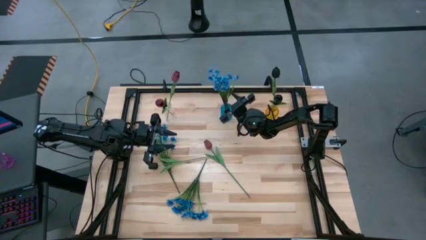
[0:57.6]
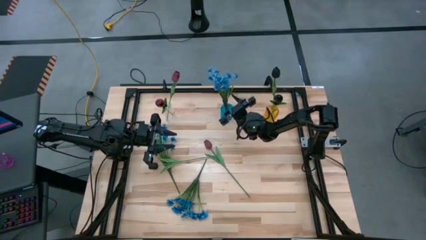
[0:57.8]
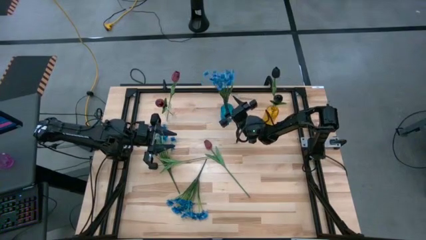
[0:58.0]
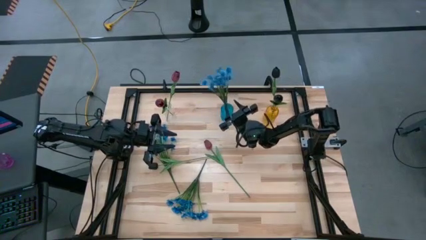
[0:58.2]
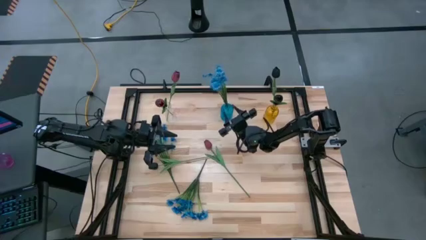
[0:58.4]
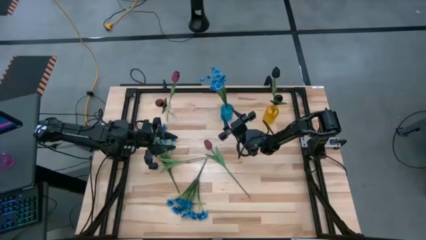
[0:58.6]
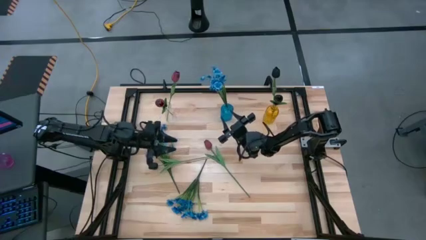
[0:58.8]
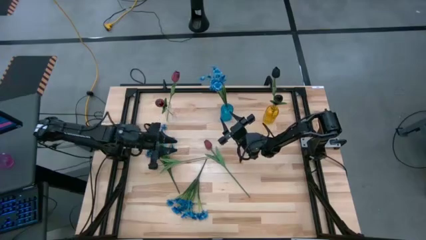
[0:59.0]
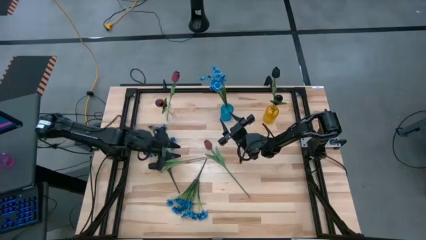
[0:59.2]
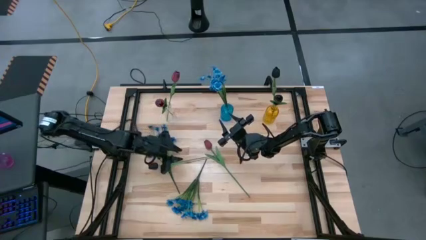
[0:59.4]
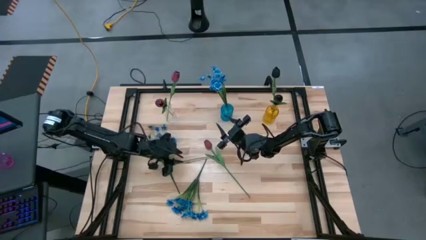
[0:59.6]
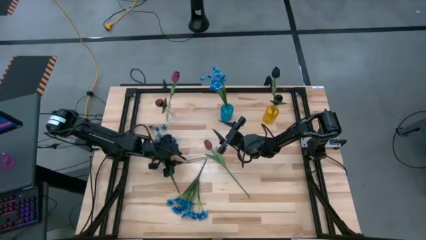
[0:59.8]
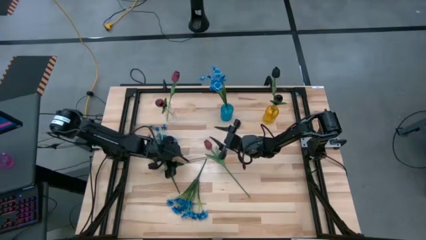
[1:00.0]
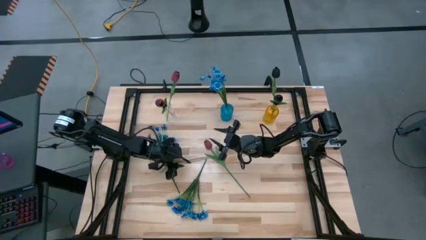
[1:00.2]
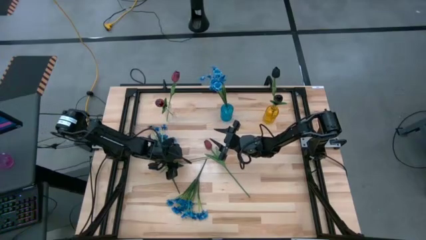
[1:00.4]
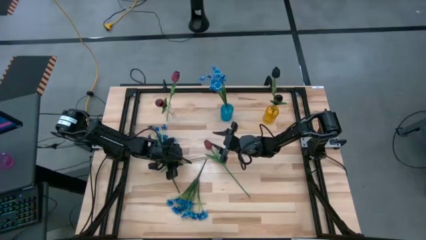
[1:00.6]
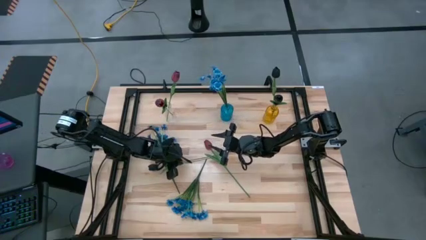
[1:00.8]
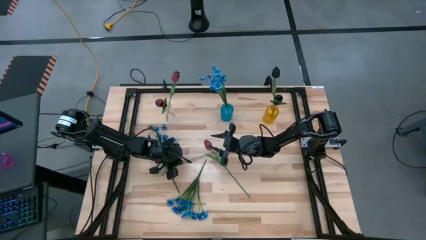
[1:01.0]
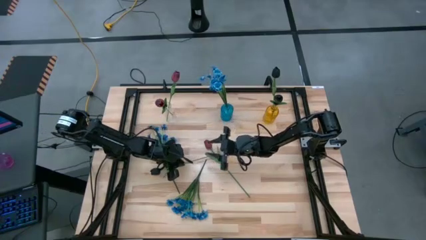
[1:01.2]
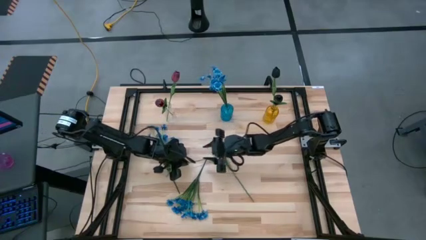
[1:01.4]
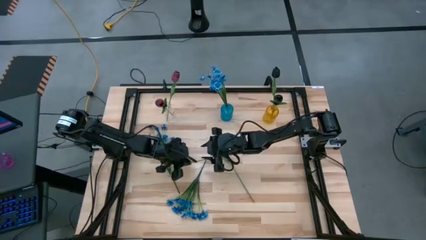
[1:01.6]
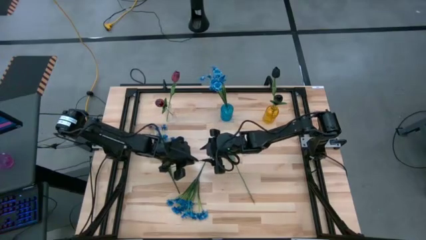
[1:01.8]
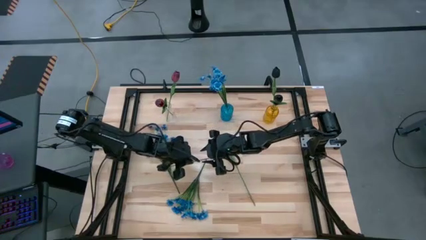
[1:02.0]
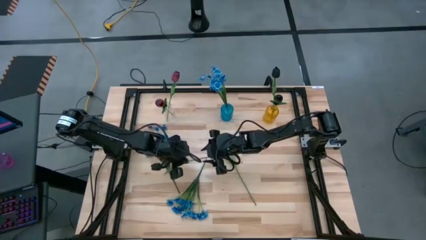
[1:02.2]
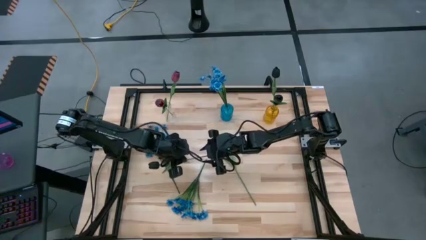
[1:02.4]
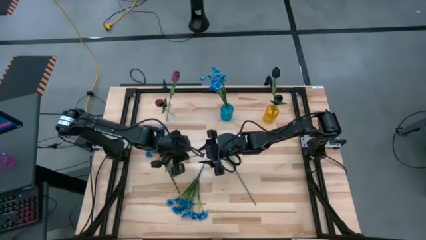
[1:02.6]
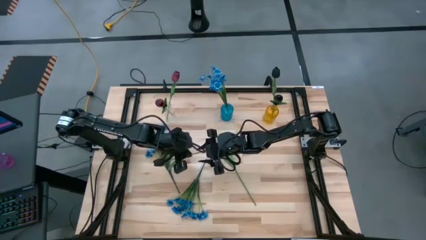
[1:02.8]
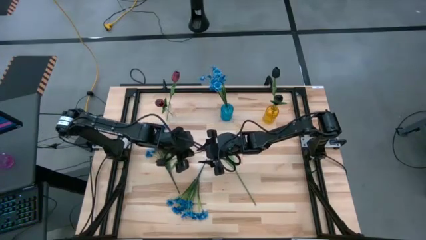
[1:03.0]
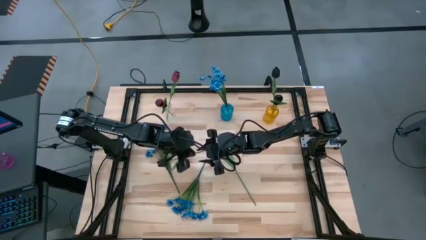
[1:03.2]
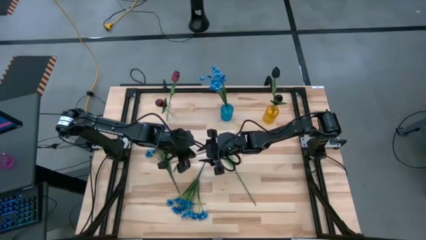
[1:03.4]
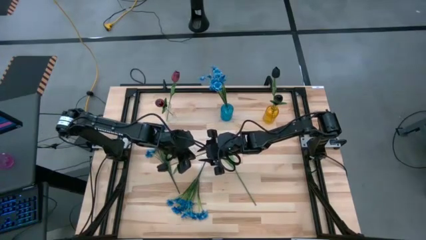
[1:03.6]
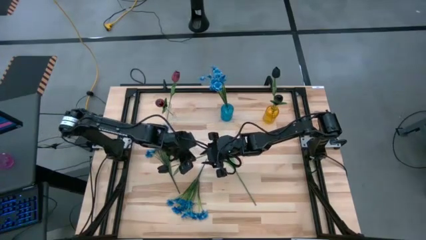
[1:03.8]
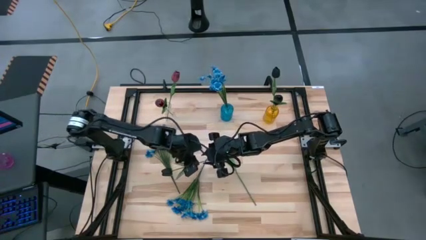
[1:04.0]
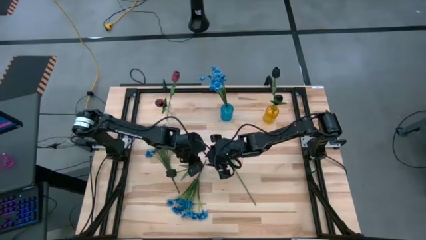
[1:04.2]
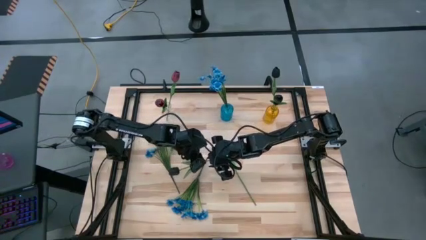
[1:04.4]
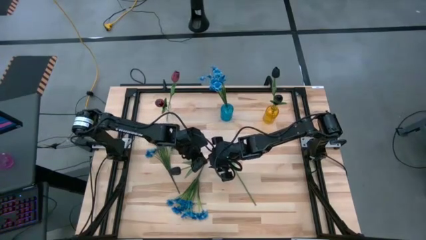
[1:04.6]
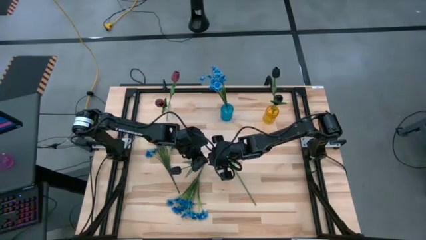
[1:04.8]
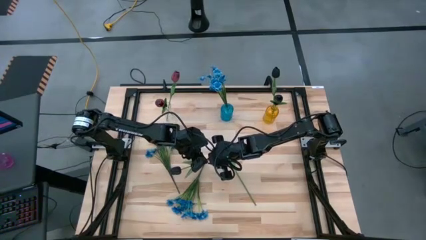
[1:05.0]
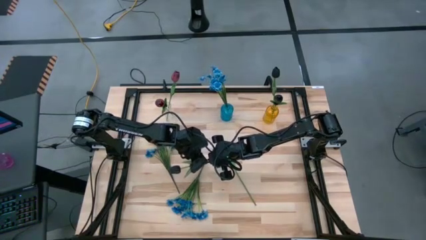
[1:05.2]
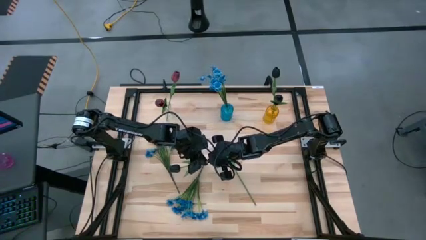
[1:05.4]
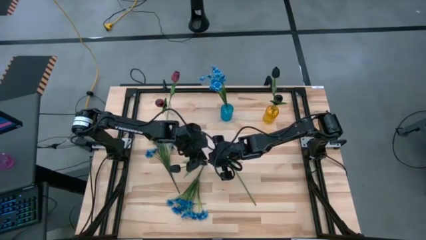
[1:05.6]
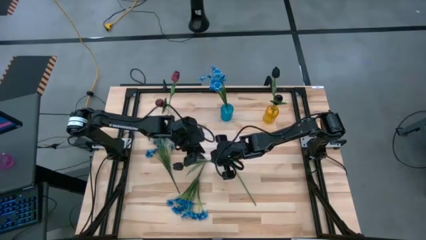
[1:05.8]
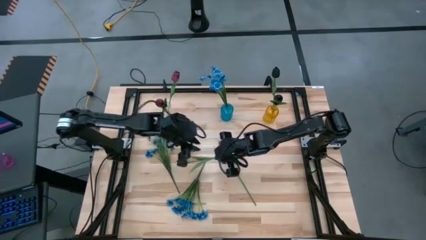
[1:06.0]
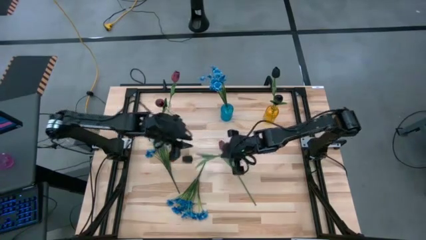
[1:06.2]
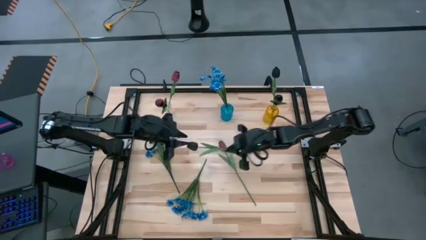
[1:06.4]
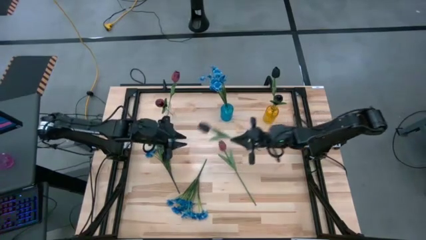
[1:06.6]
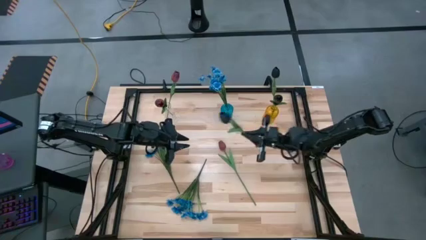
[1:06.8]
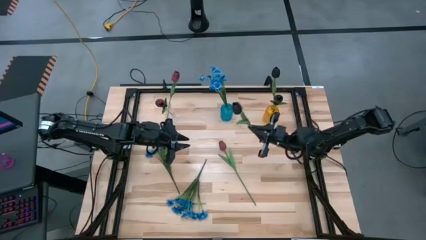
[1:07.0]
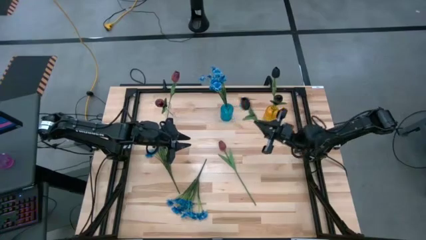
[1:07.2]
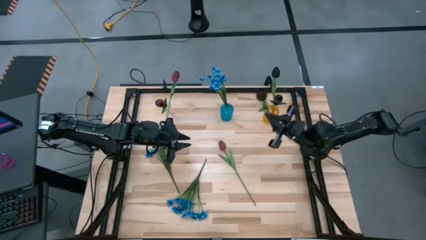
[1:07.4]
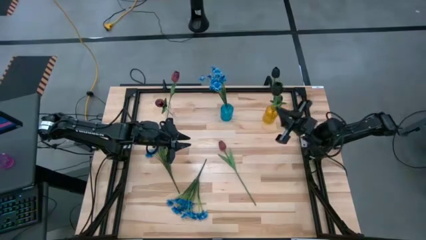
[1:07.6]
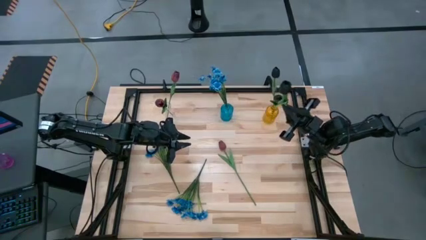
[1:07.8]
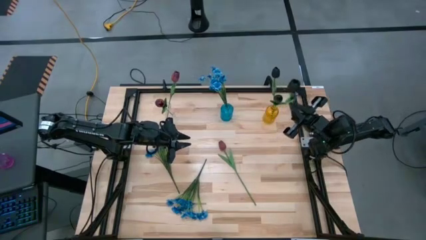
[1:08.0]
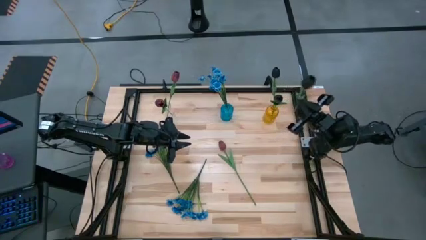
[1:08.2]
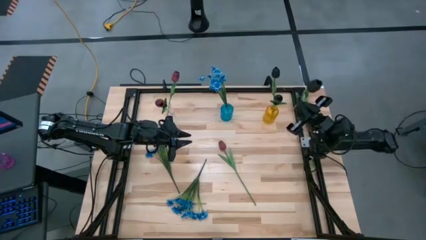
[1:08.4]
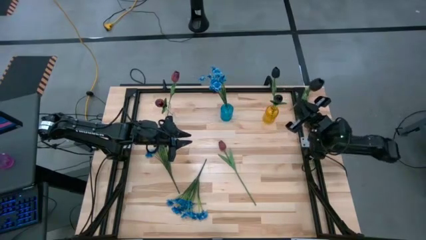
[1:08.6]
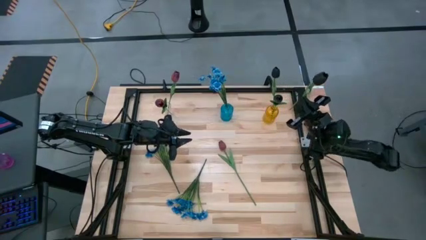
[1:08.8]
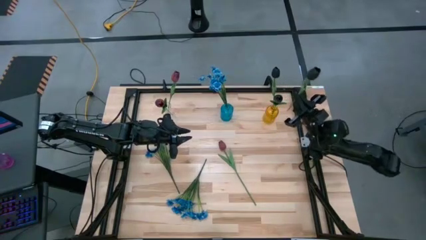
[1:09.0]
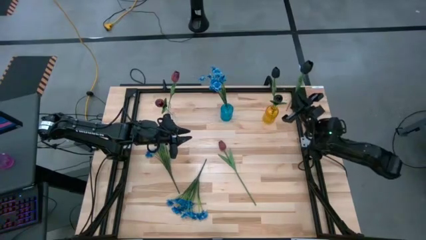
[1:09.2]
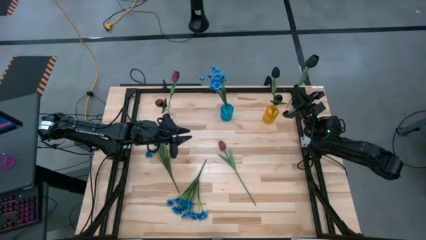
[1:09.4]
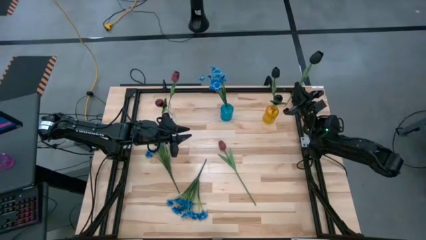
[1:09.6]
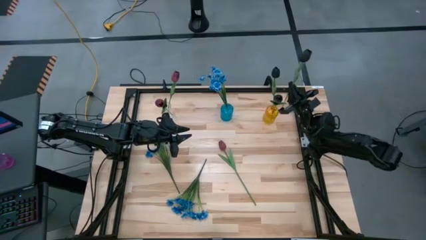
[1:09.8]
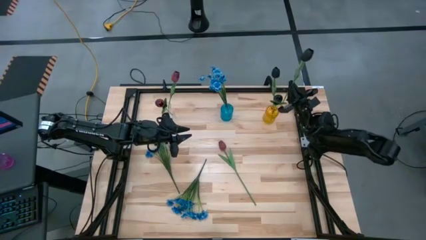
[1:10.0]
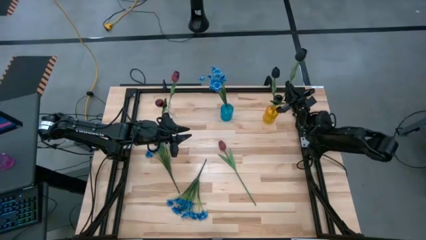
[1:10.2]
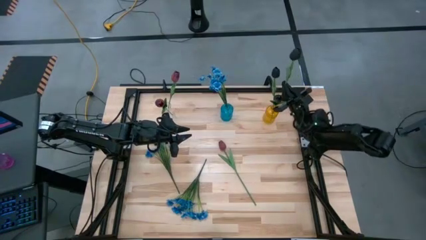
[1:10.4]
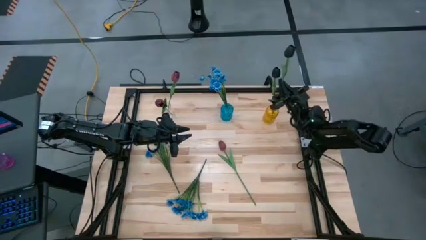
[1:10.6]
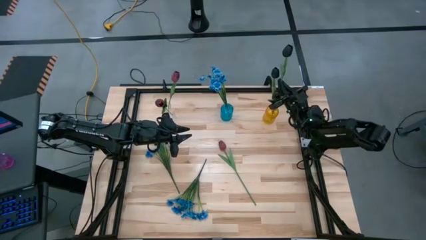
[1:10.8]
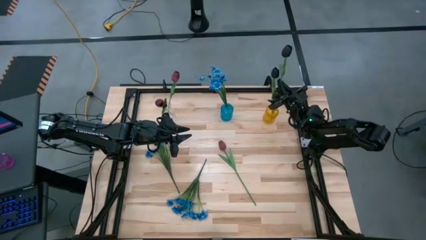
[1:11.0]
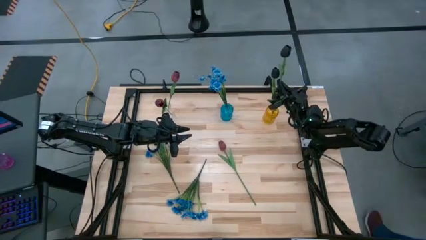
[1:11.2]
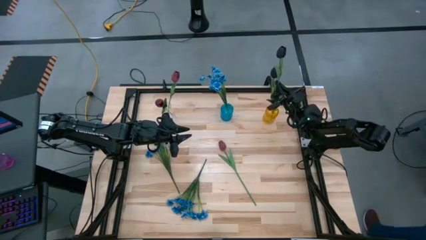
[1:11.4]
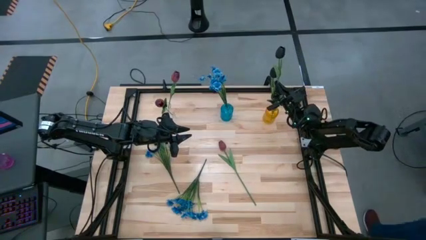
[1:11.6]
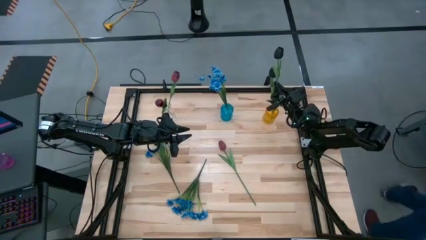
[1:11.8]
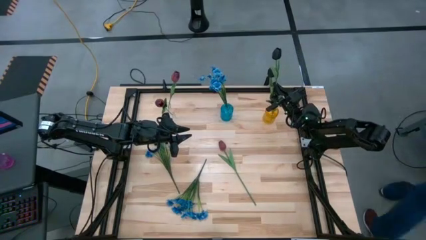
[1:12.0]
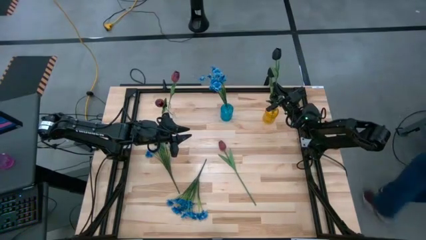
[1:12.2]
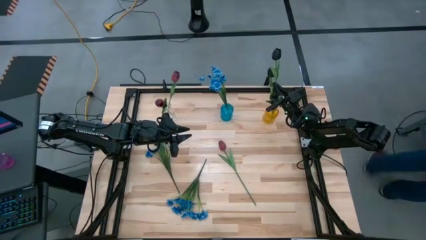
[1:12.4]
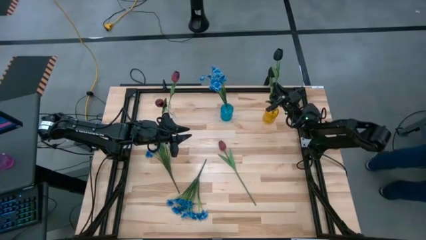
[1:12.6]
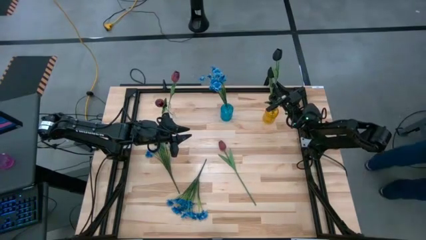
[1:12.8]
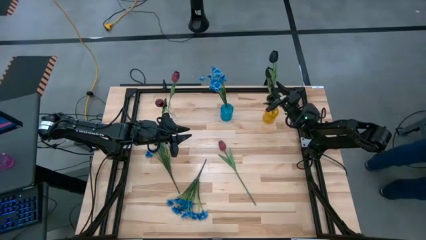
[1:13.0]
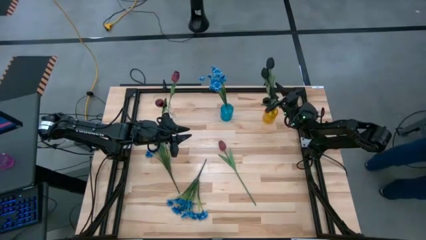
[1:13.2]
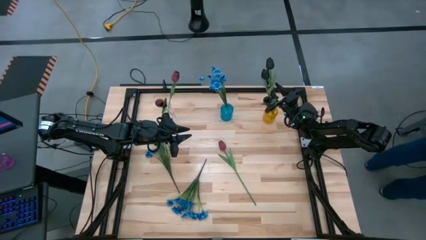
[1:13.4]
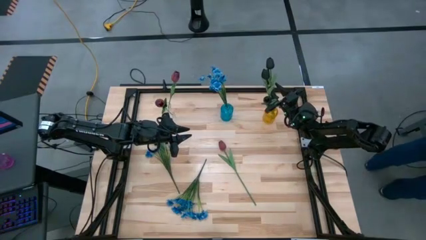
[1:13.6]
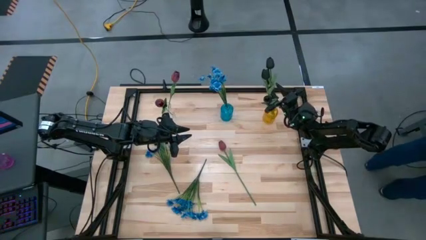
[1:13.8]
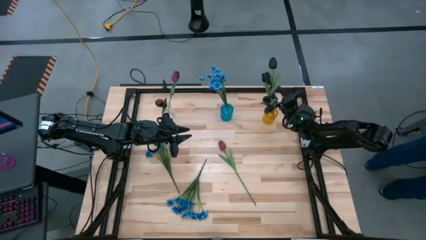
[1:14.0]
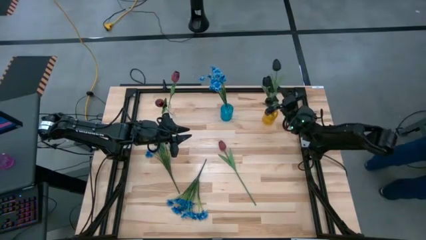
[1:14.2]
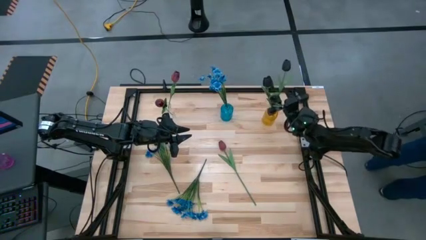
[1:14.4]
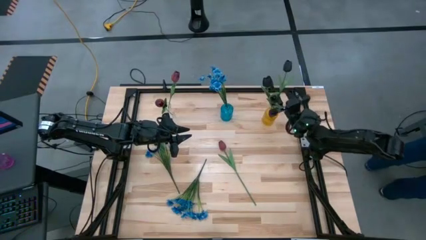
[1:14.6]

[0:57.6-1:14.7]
Task: Sort flowers into vase by color
Put the black flower into the yellow vase
